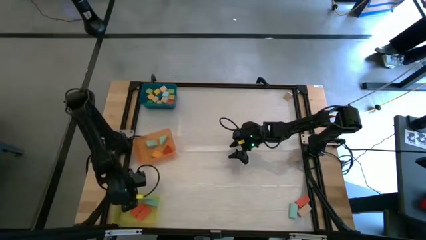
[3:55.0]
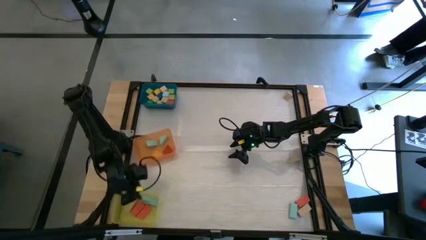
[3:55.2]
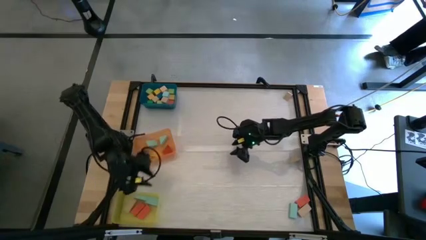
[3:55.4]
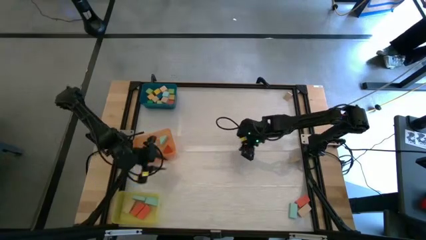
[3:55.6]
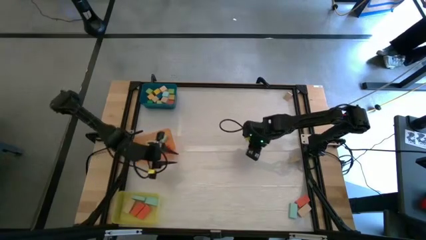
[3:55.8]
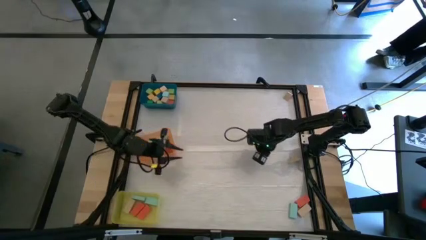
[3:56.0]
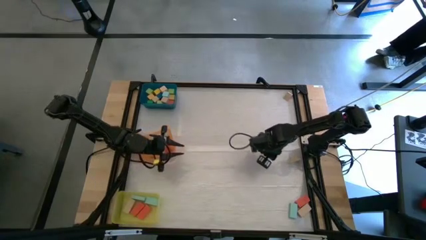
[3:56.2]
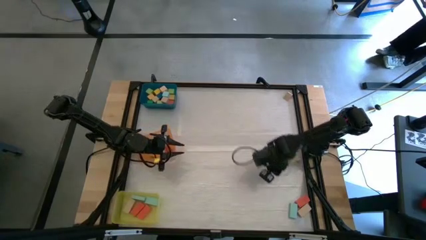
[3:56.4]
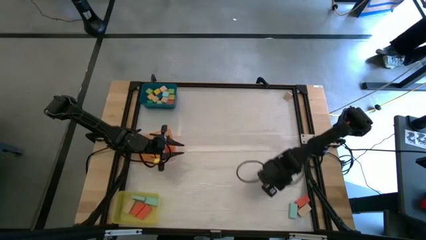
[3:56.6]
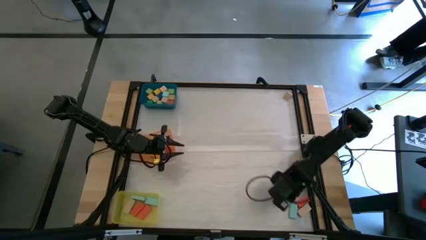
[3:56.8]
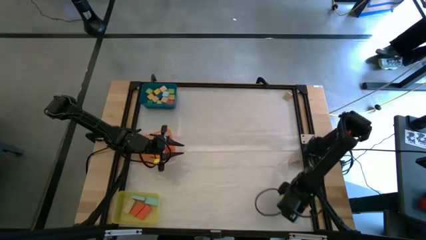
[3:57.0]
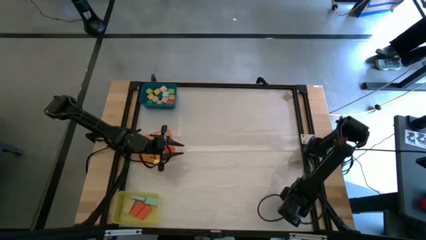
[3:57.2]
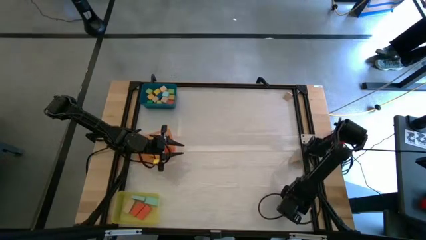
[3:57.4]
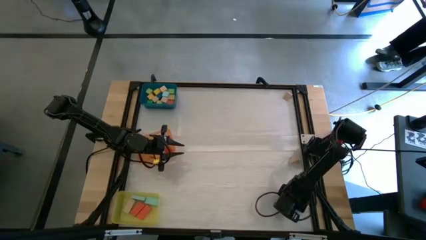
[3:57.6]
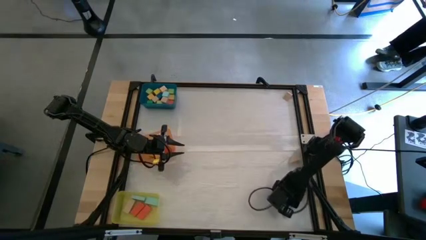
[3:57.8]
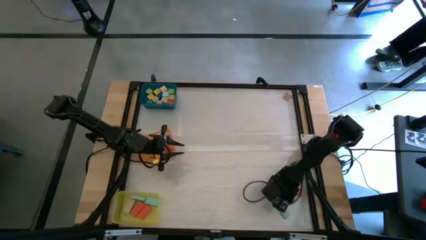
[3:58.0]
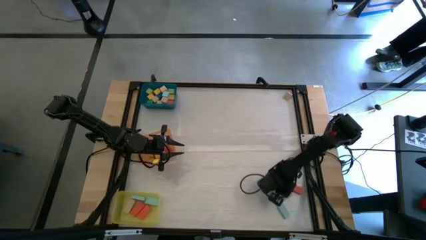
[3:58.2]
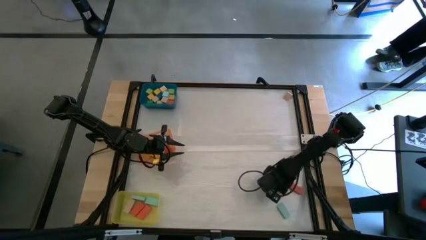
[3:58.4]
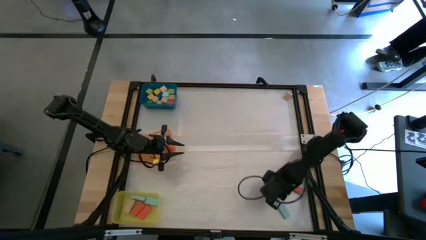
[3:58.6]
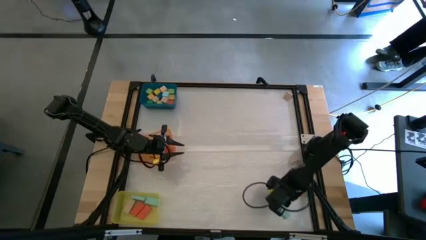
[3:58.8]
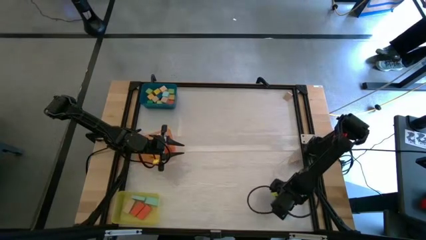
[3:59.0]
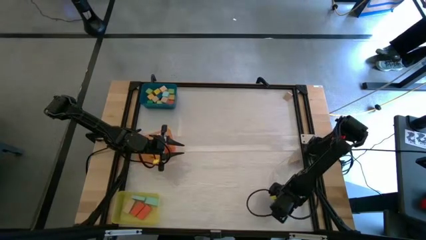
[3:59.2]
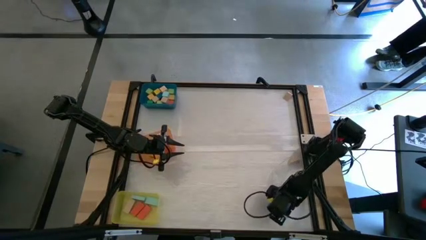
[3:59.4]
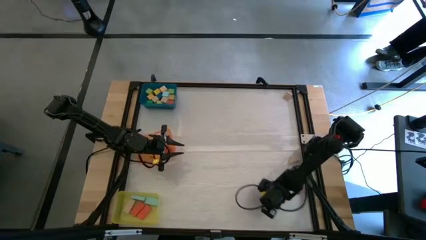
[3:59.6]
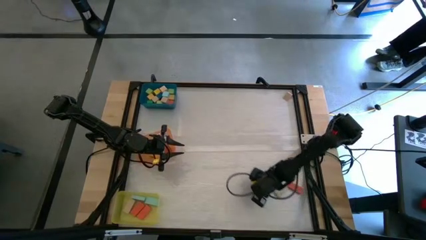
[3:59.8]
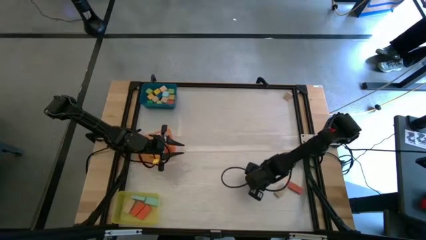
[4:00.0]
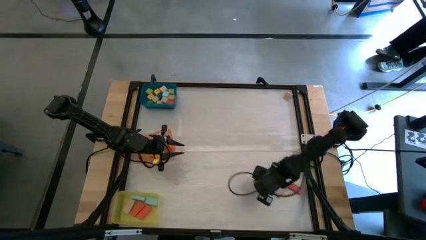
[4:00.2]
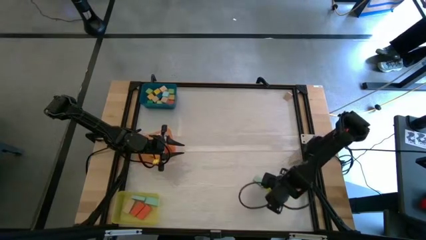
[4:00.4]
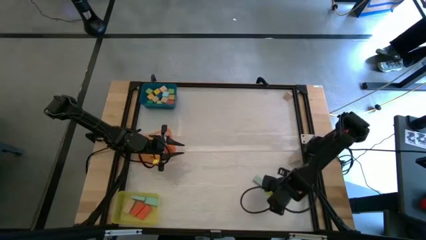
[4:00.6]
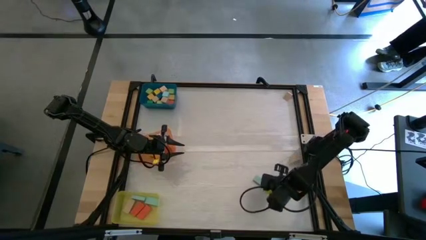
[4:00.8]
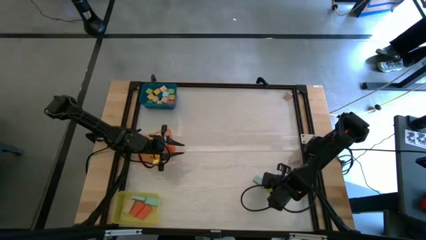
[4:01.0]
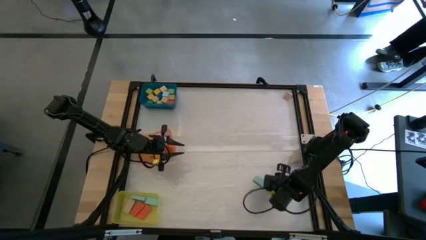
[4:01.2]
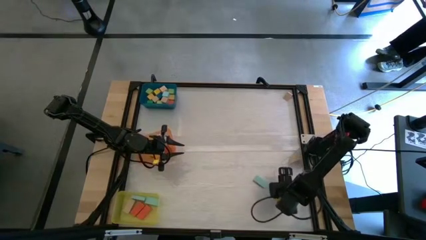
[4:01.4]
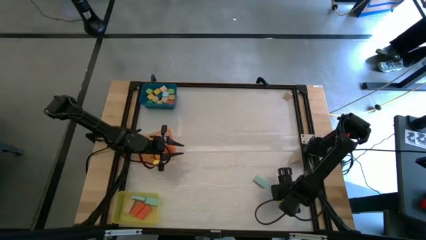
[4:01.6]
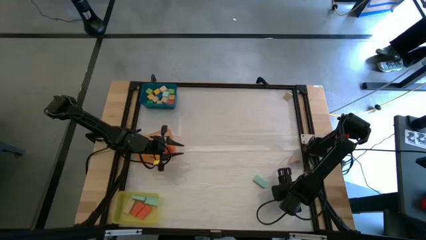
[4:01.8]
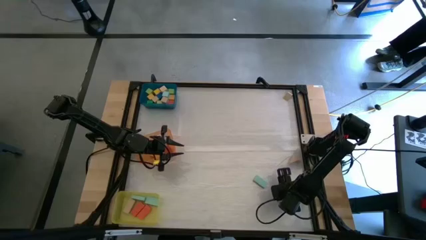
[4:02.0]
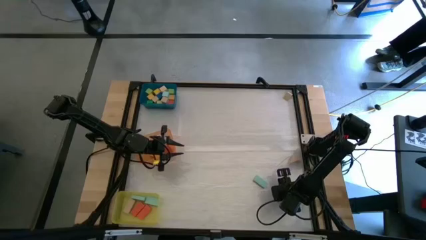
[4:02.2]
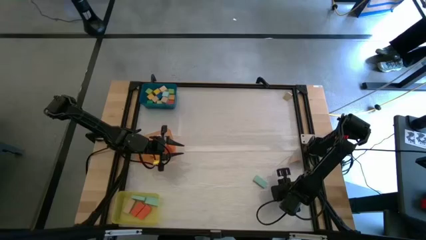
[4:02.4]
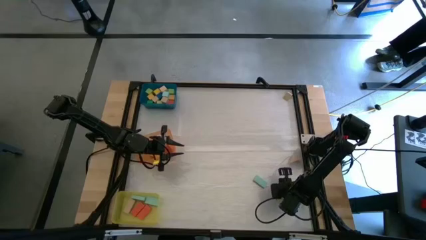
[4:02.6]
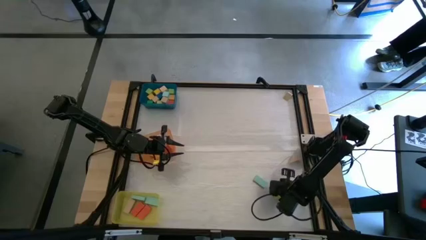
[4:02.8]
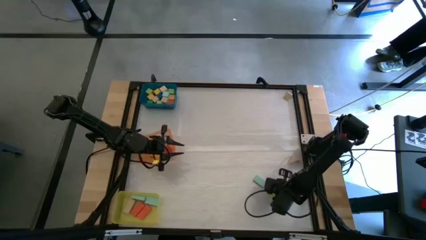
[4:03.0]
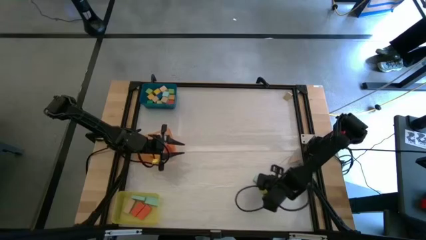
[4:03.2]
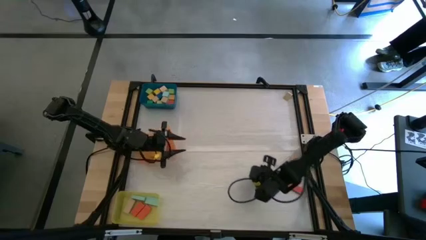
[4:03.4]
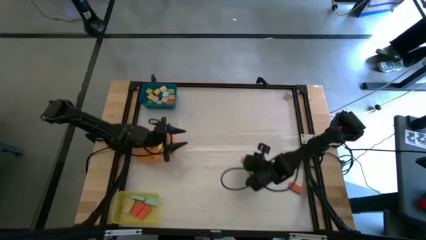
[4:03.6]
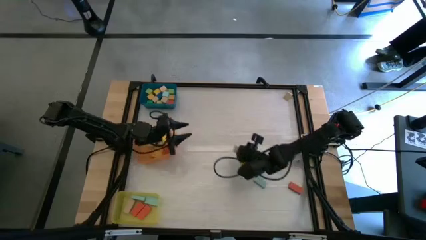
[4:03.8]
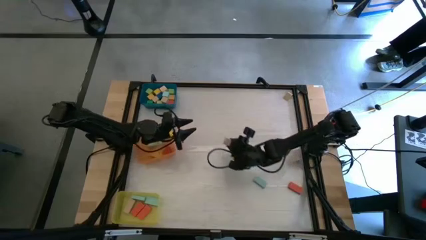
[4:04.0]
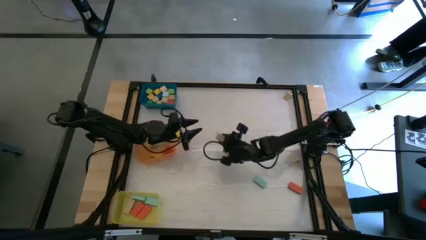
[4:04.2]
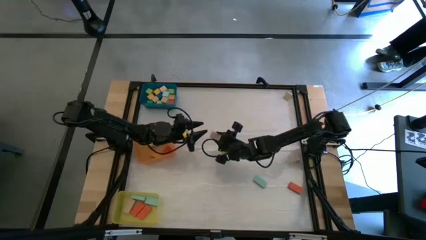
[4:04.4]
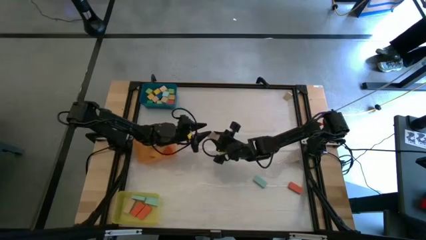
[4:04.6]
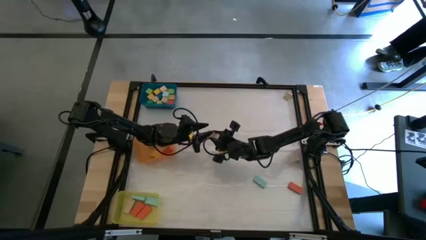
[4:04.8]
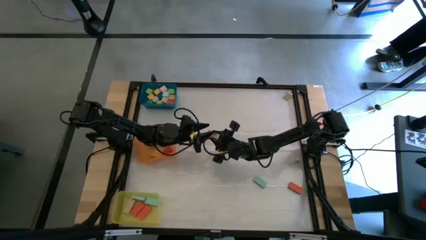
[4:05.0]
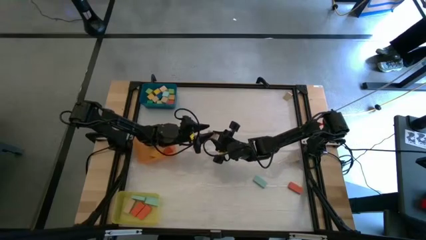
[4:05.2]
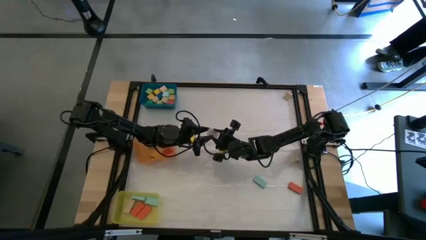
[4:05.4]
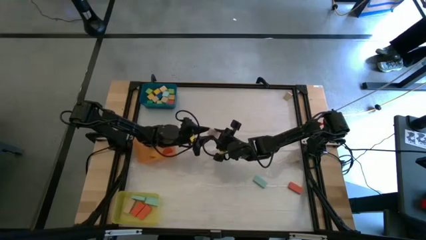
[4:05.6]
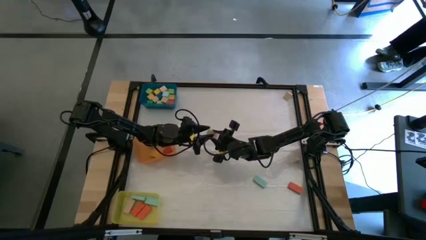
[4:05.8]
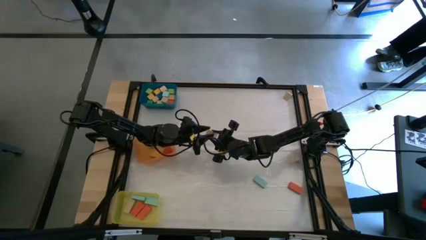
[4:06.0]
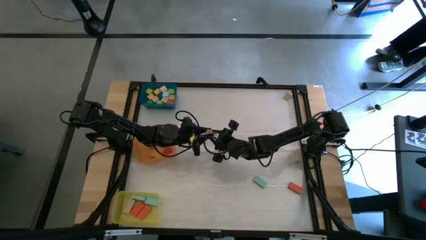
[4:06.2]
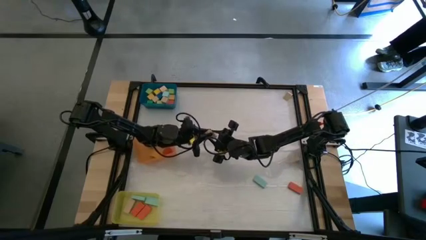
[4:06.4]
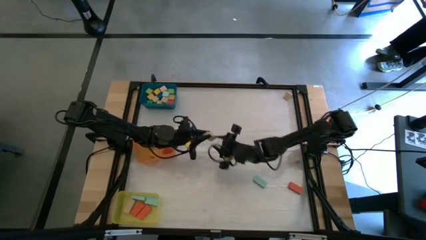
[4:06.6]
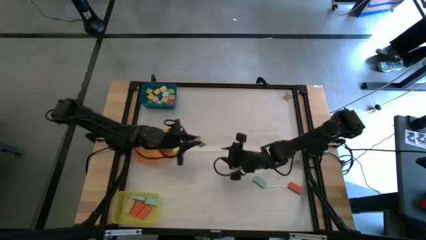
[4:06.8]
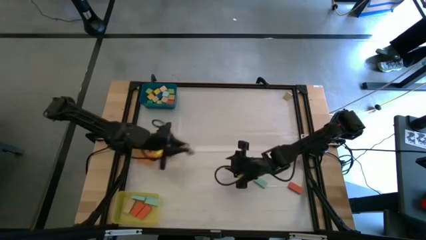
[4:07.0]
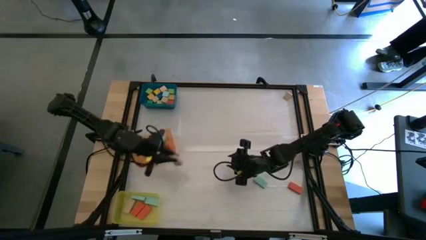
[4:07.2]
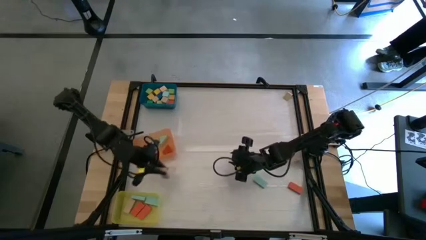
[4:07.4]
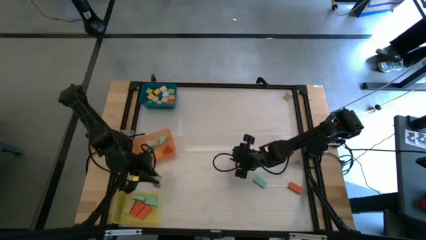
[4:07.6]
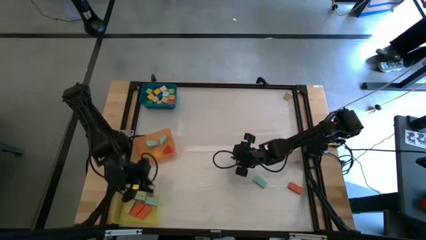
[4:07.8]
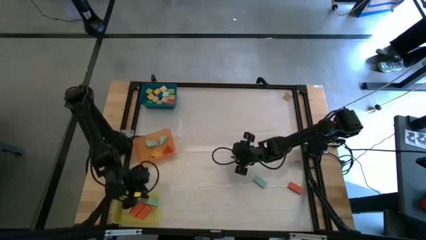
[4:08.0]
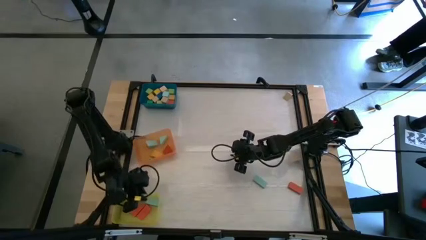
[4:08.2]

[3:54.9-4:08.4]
Task: Sort blocks by size
Put the light brown rectangular block into the yellow bin

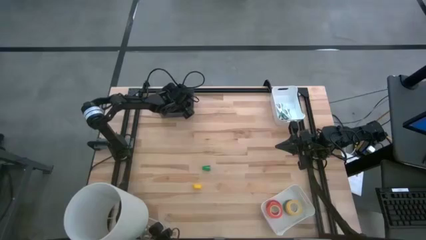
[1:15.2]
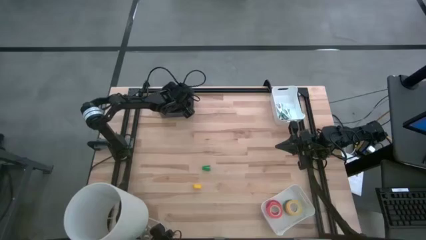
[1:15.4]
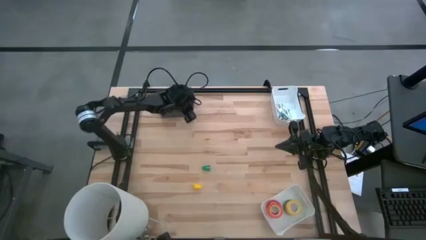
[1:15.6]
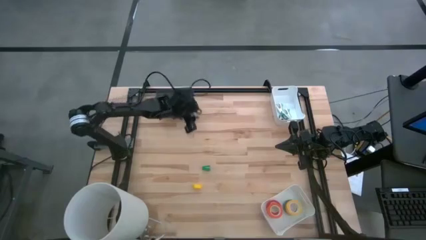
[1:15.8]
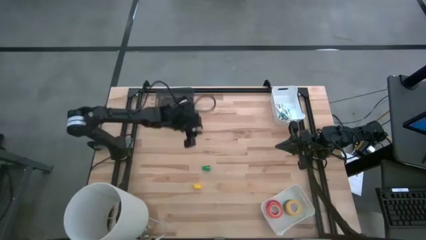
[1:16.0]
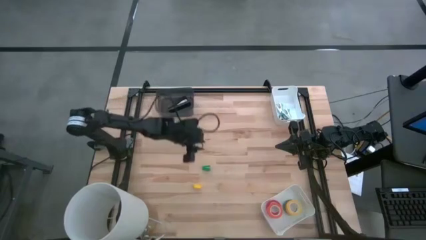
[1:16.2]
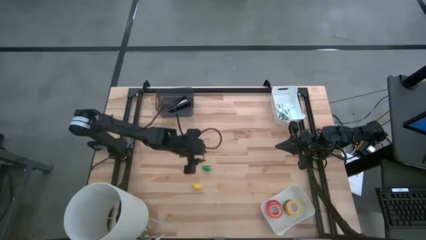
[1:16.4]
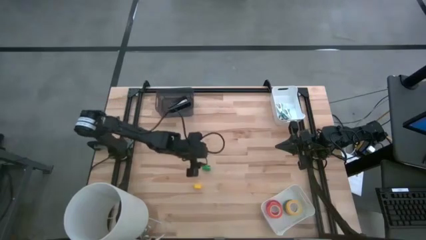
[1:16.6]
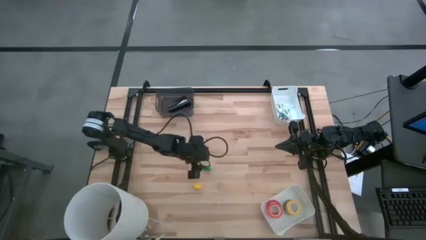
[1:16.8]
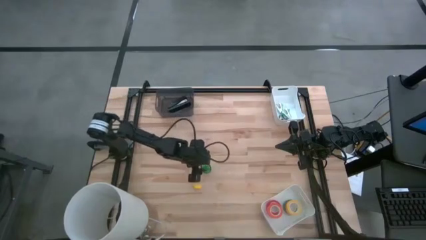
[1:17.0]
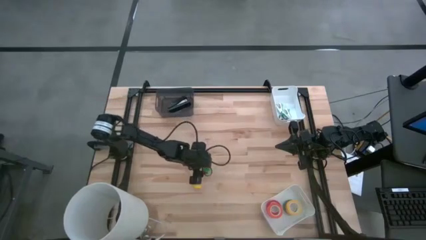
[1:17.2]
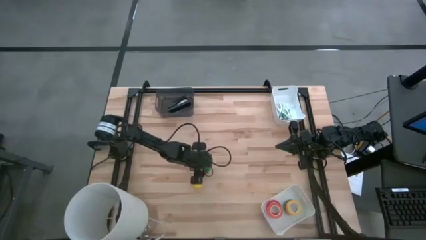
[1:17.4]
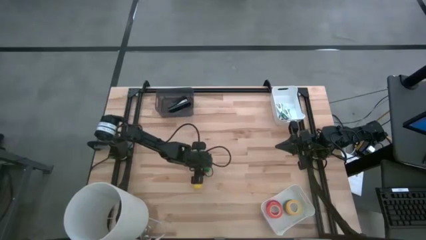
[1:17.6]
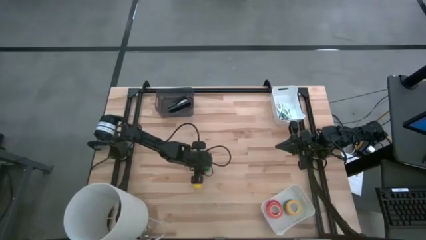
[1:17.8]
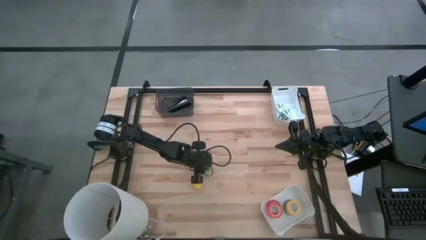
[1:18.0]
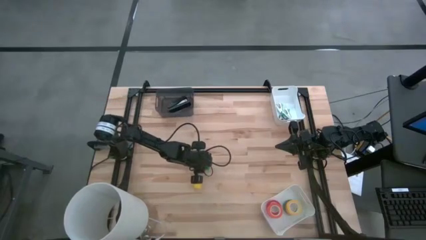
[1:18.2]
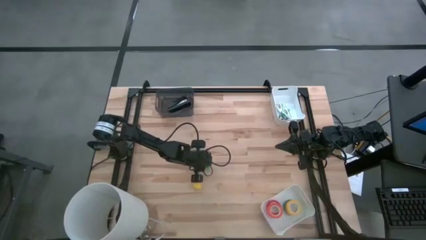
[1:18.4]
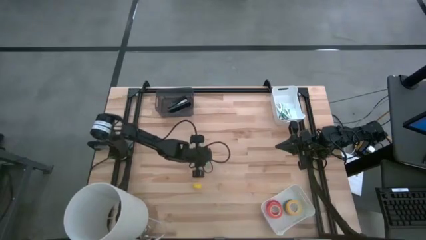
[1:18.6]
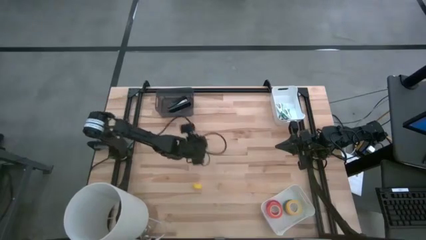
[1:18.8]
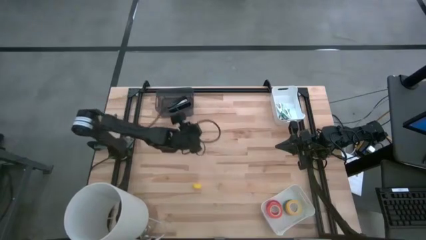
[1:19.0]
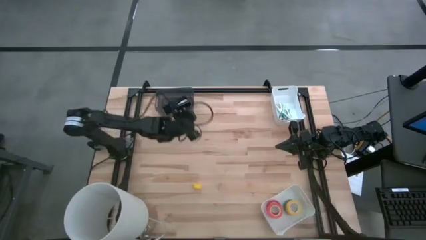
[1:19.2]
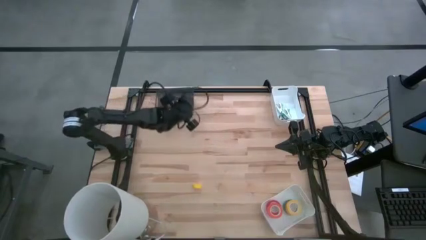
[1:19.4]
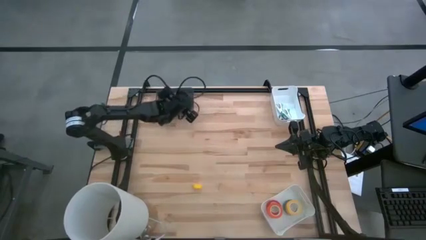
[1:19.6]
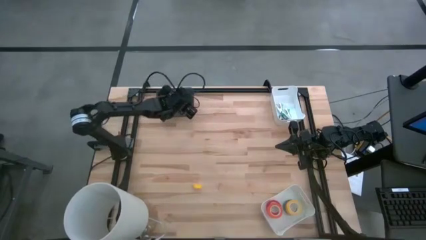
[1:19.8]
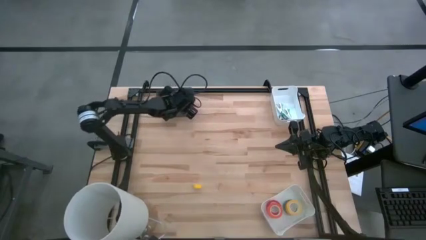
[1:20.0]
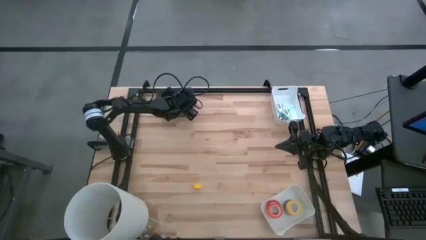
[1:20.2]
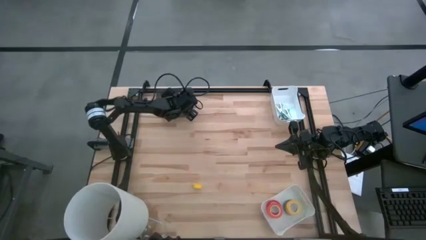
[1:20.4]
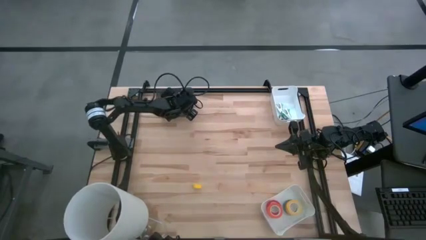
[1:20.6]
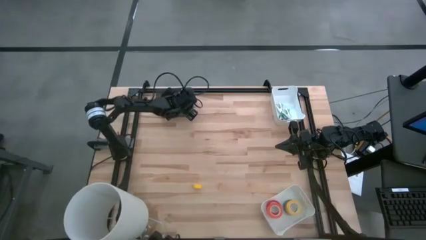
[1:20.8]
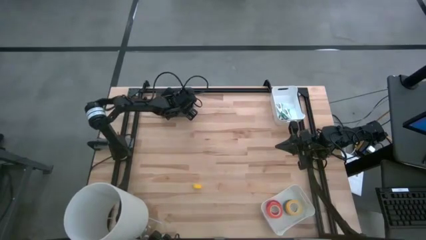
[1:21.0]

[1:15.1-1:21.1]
Task: Pick and place Stapler, Stapler remover, tape
Put the small green stapler into the black bin
